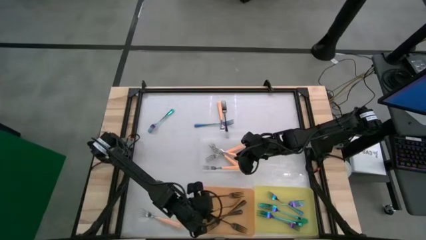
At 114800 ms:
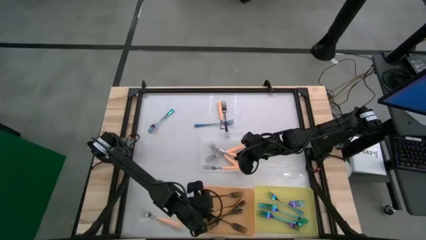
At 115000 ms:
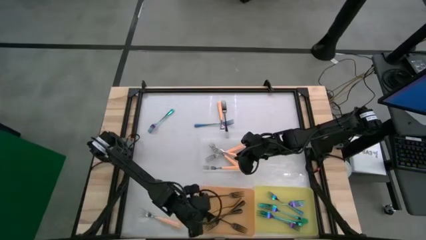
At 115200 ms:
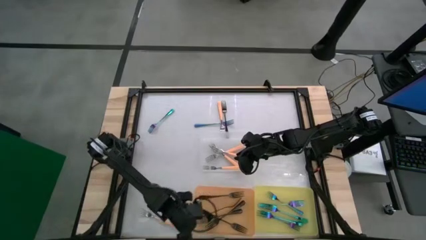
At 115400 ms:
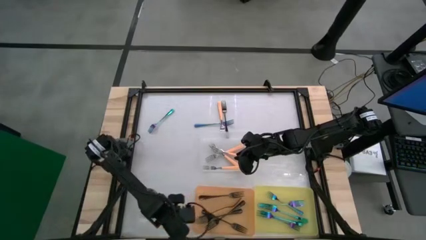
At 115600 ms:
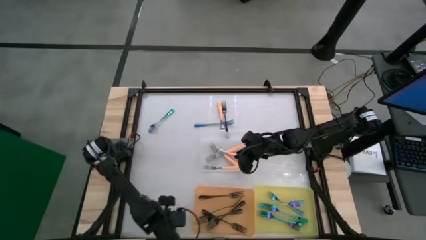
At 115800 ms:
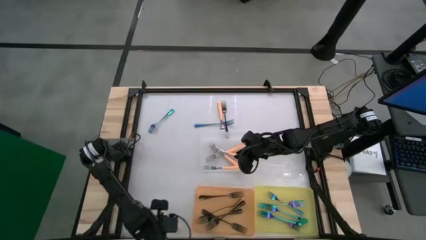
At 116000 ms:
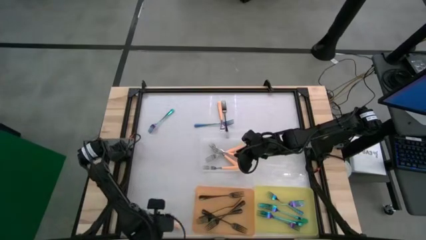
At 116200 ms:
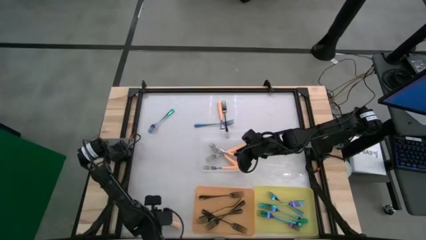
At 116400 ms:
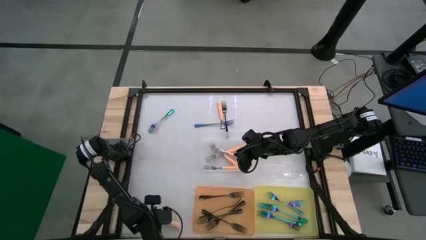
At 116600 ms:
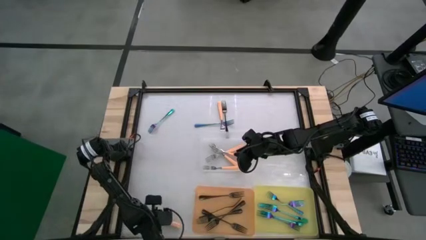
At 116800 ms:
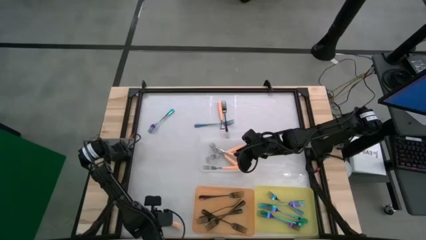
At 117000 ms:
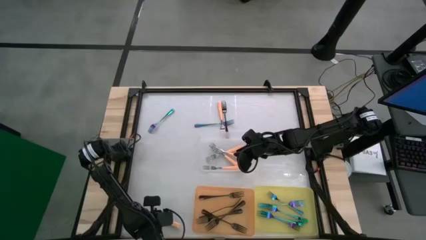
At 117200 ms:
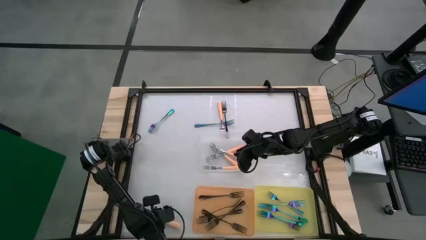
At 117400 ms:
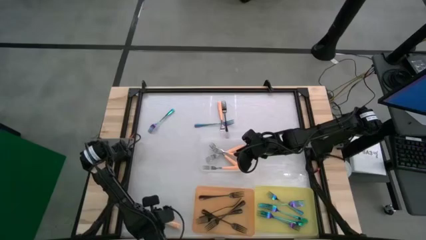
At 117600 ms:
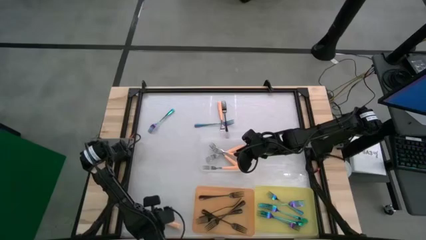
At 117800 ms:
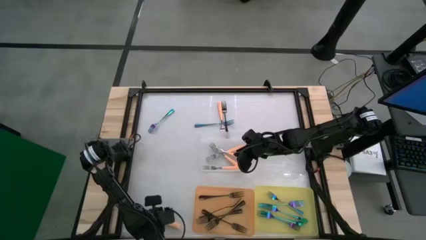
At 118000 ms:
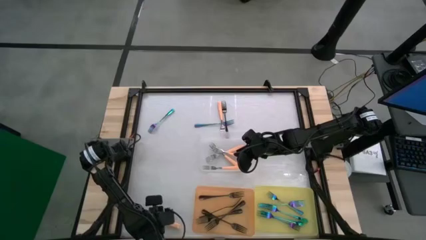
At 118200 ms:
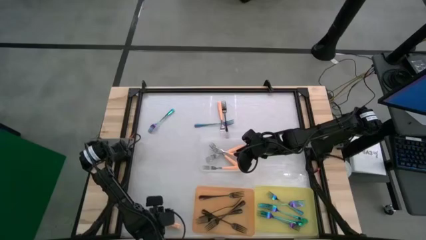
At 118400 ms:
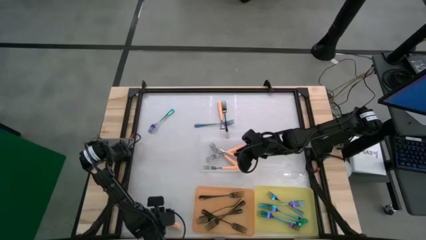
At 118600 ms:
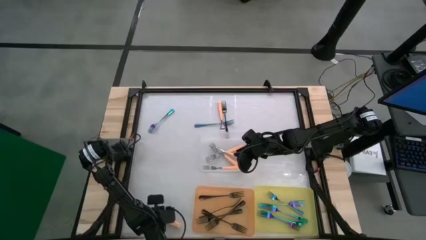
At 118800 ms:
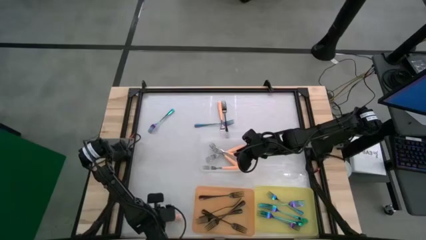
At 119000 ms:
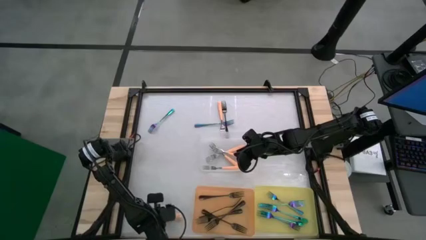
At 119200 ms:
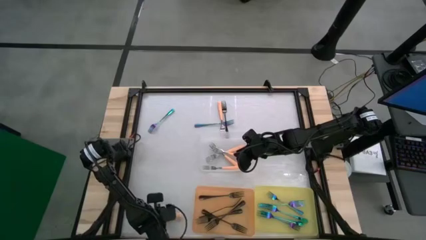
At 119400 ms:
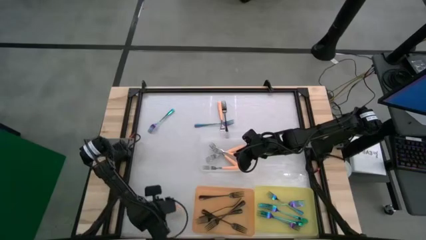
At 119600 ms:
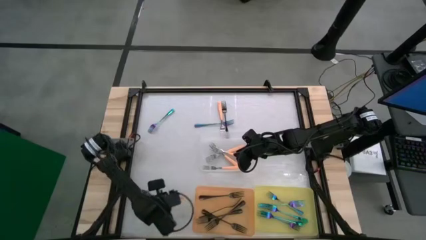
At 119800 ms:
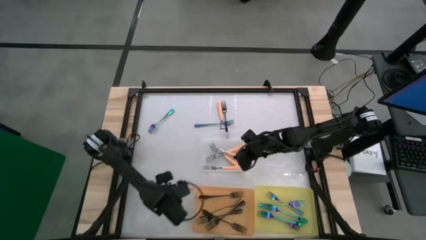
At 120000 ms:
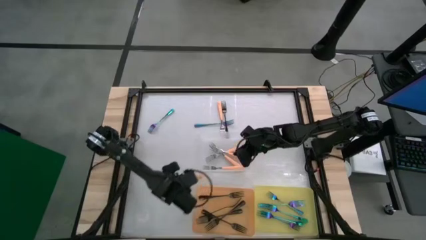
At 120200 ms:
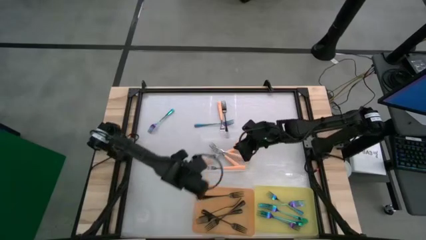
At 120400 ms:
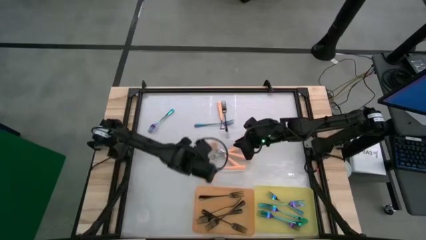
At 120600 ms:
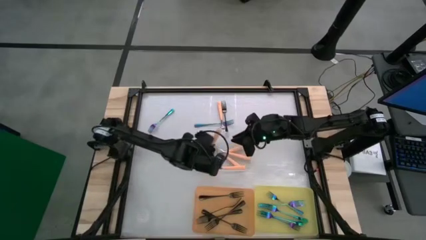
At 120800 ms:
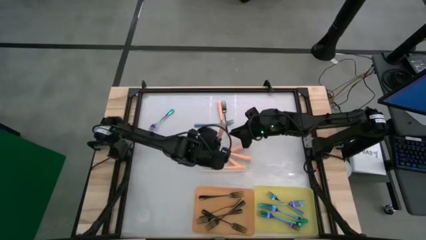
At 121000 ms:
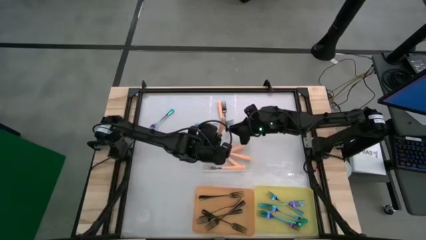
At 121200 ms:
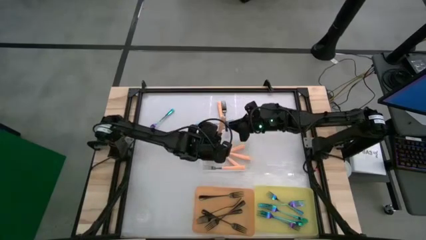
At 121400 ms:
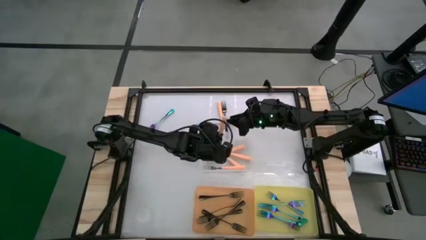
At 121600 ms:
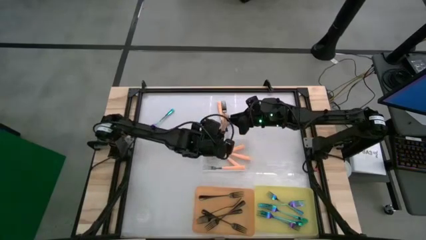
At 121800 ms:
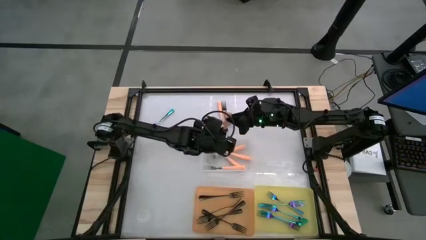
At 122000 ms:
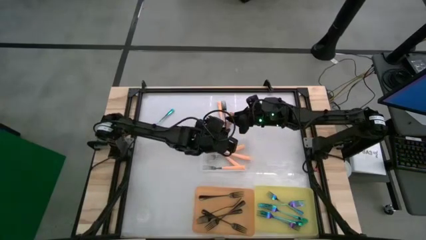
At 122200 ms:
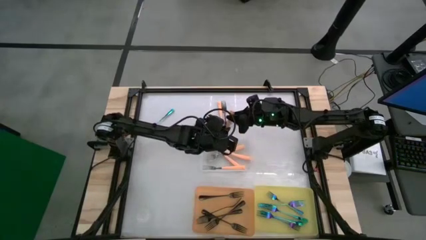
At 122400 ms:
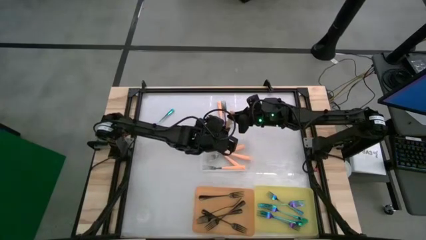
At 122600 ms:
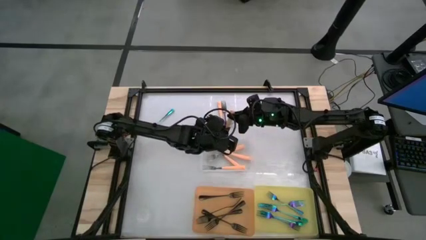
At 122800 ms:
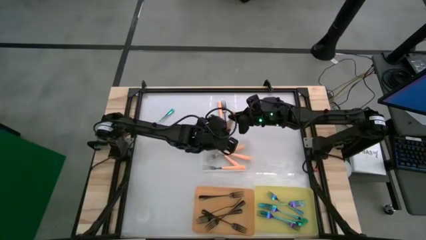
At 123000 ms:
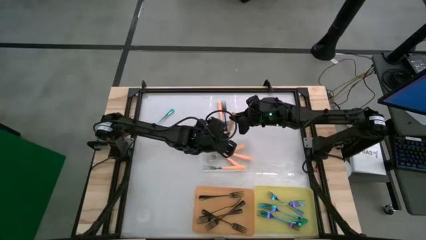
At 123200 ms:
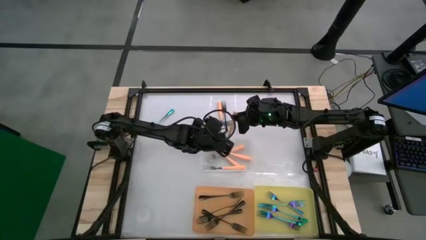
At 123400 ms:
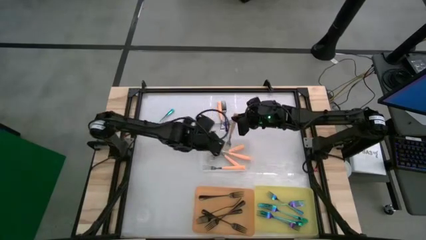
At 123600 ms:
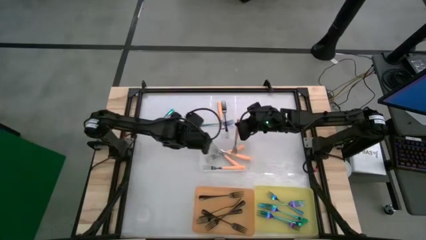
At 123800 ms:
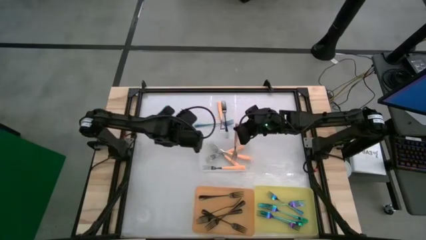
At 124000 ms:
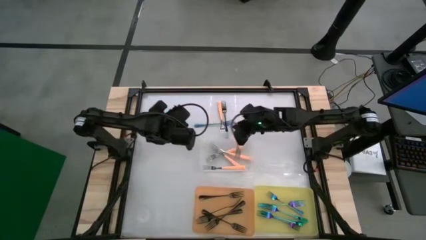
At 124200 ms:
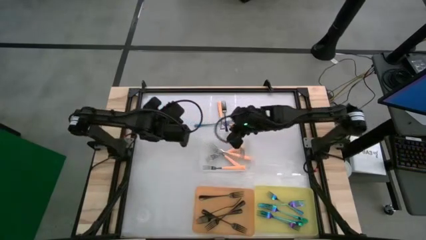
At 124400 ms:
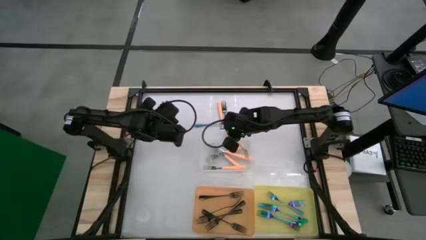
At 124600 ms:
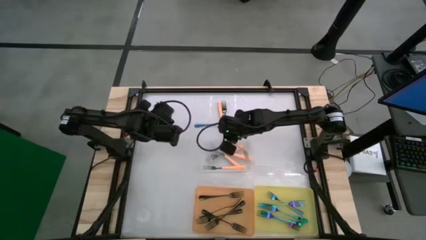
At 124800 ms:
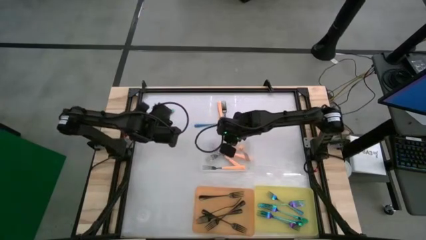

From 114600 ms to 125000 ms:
Task: Sort silverware by color (type)
Put the orange fork into the transparent bin

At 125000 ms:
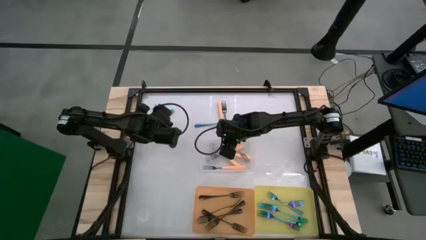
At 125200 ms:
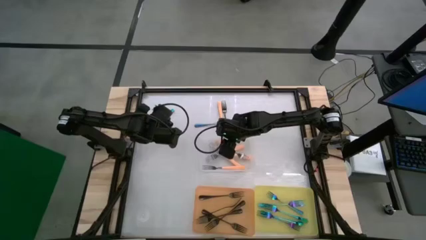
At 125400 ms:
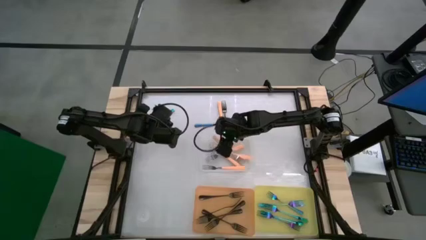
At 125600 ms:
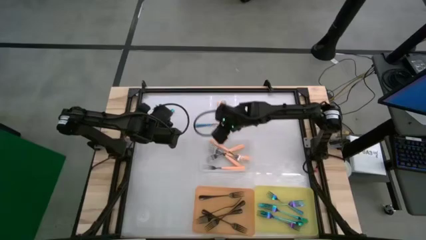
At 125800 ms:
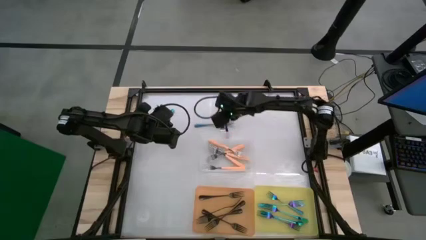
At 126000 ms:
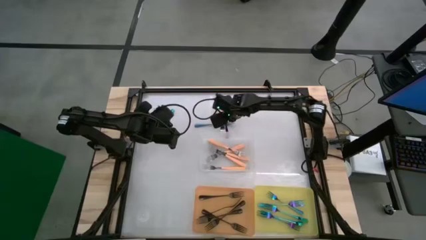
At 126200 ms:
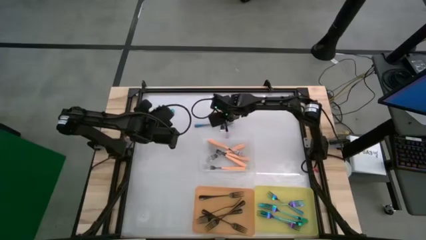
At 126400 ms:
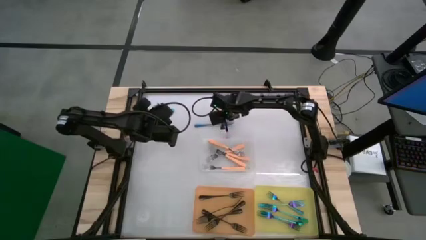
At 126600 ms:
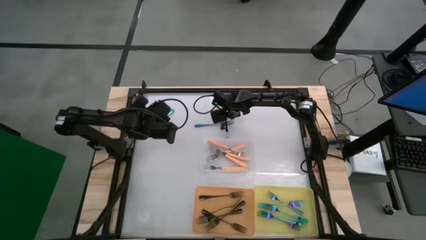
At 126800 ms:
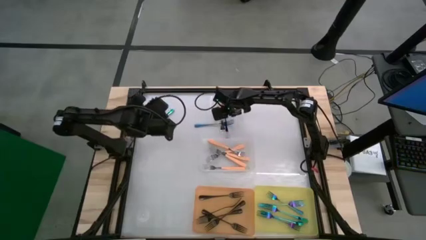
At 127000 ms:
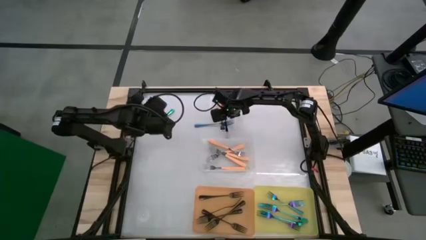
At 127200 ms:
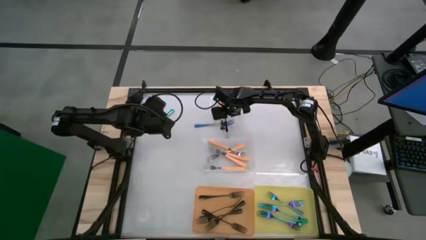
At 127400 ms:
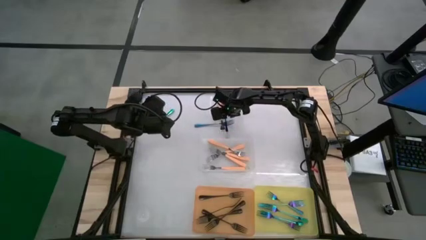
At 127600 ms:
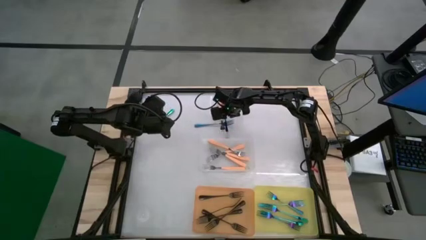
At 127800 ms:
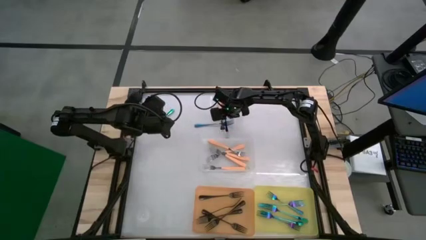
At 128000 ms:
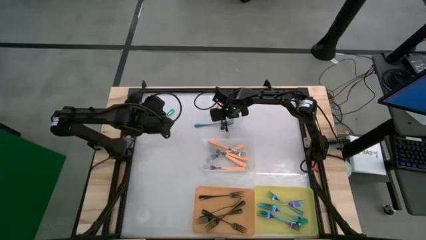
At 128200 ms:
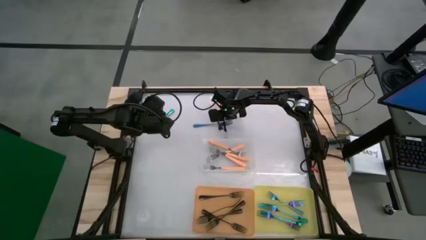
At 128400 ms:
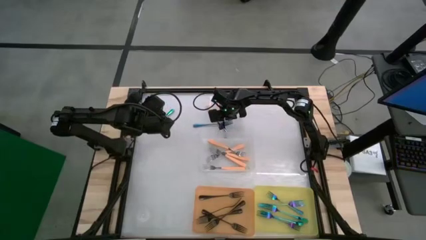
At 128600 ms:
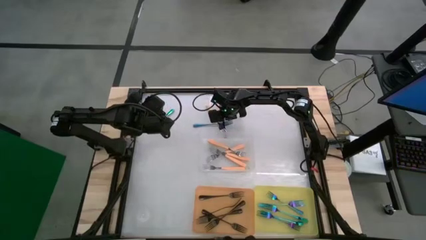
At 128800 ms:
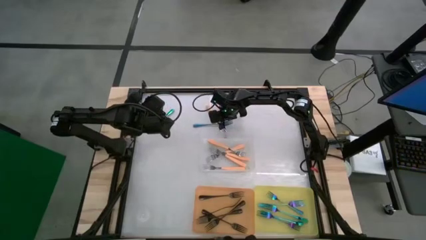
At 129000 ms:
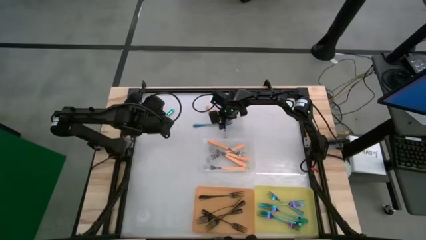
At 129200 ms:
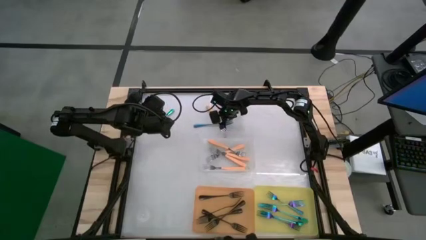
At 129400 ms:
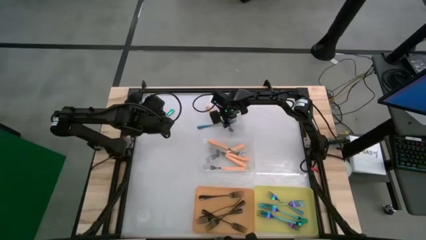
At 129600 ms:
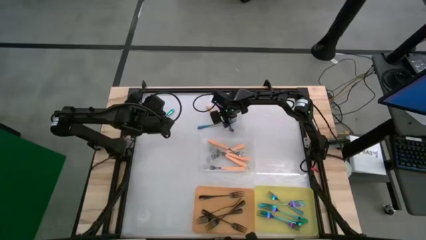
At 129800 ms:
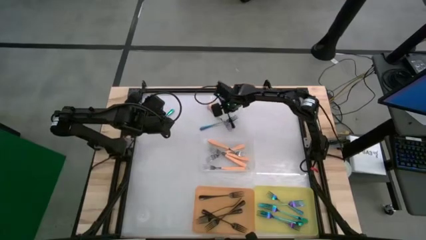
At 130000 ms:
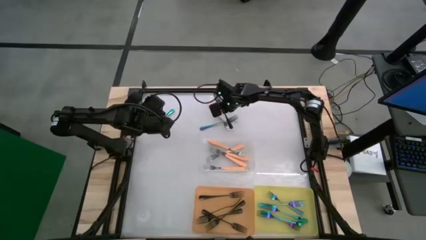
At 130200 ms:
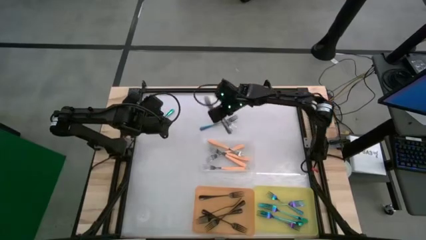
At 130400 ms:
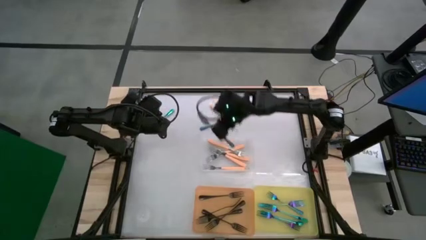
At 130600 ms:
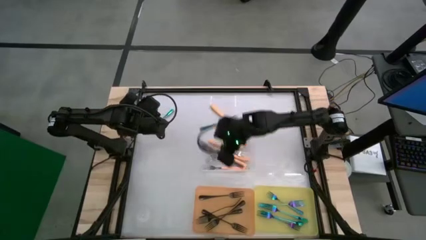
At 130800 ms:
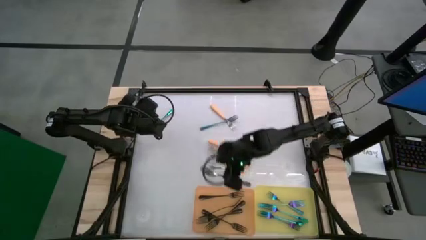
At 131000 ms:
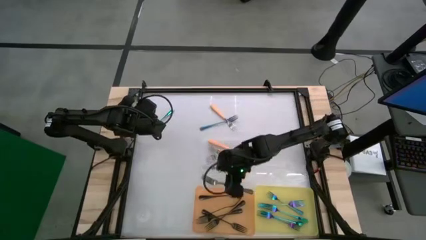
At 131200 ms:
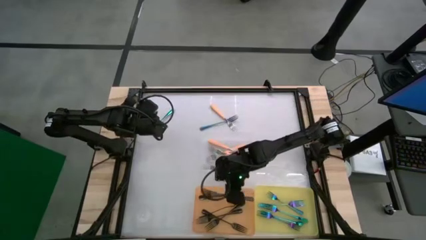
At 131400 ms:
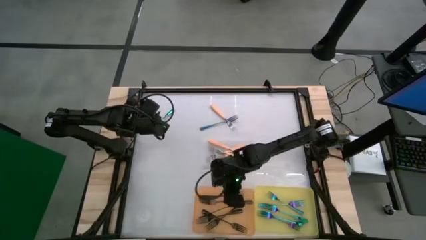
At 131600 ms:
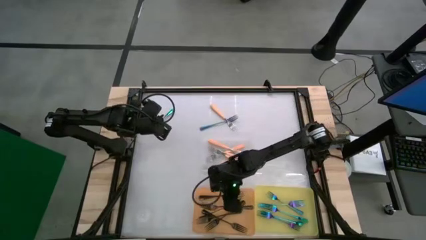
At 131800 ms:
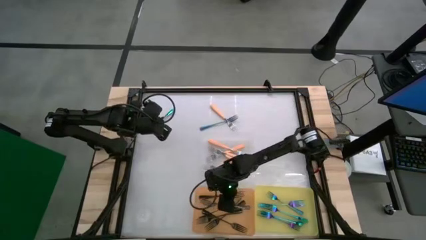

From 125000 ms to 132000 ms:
Put the black fork into the orange bin
